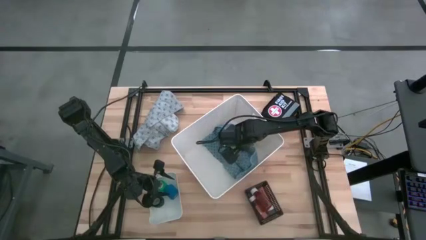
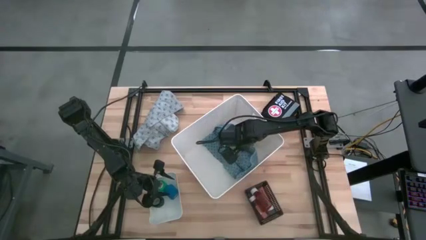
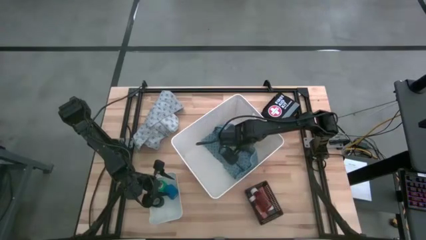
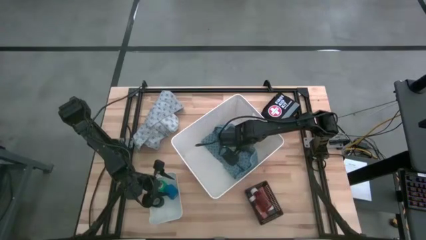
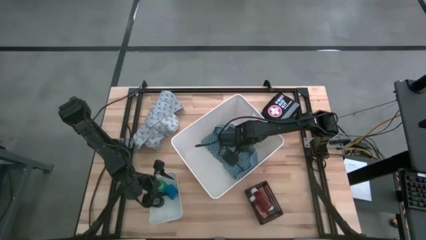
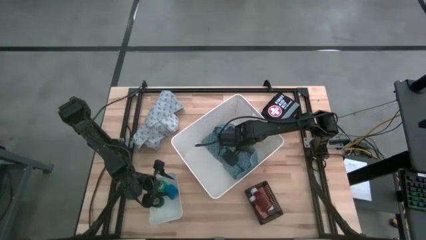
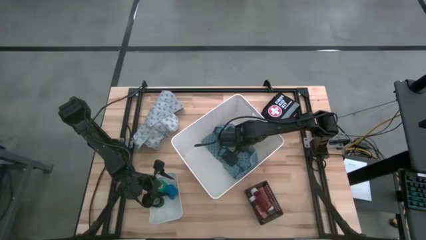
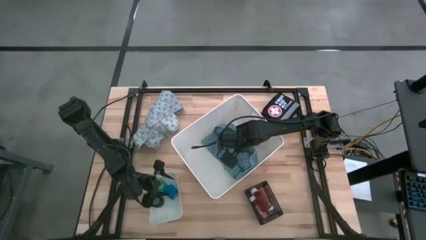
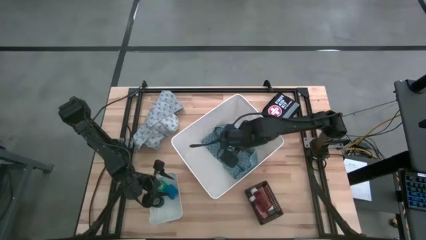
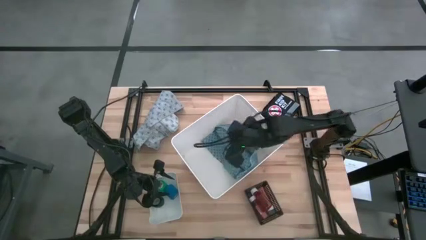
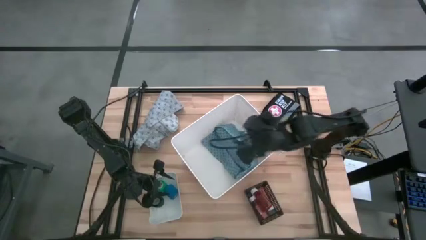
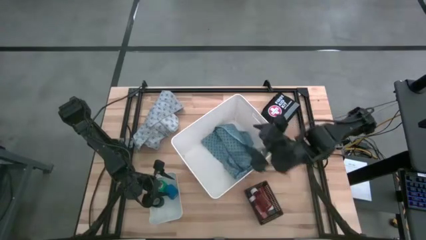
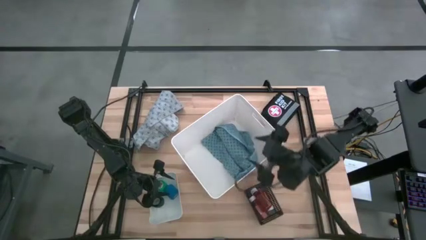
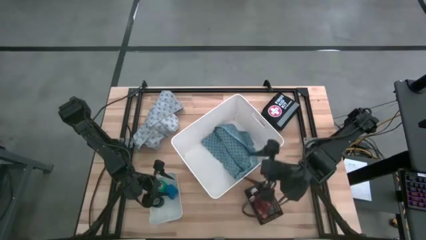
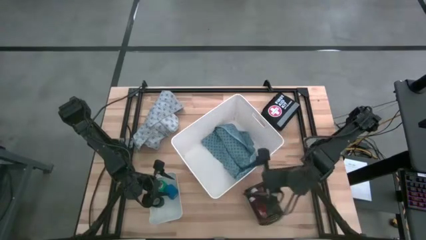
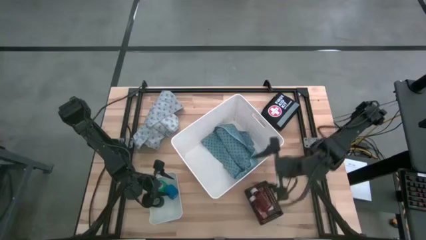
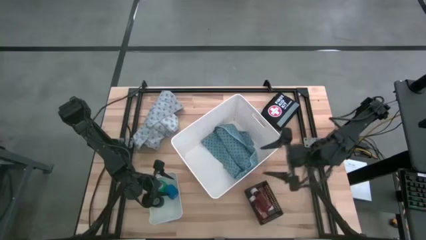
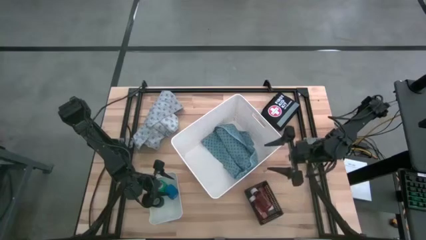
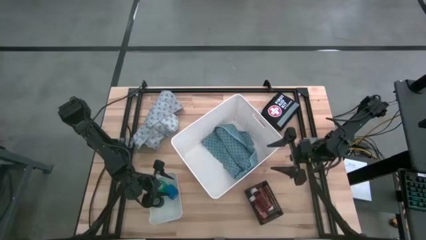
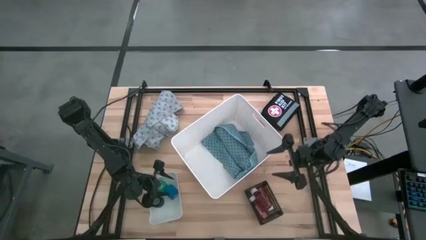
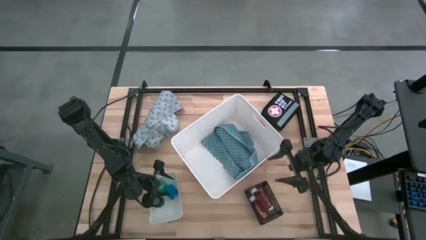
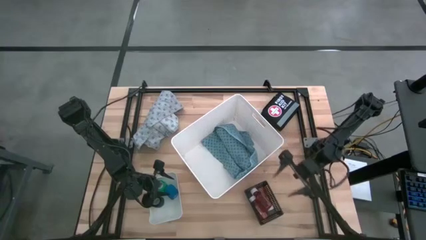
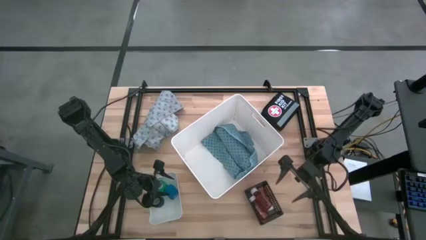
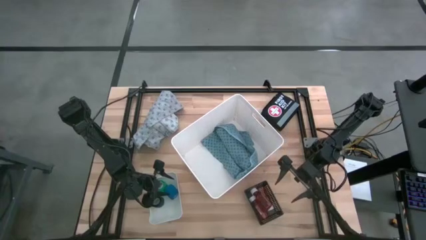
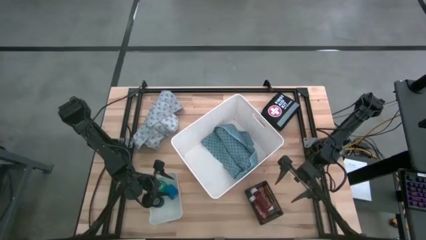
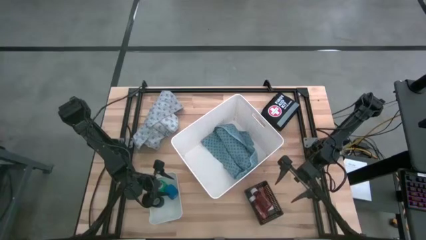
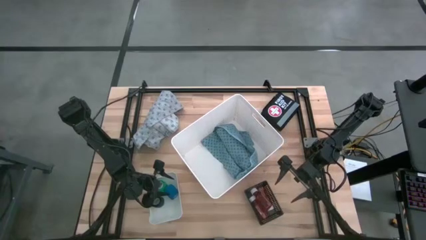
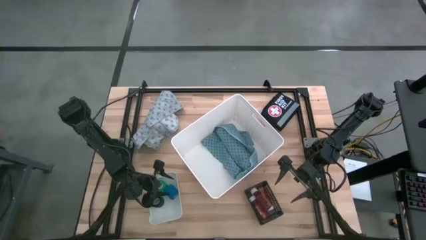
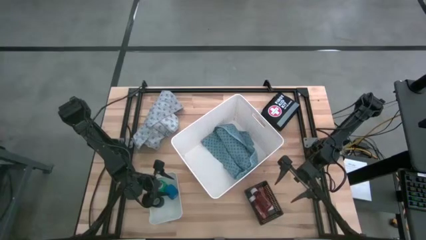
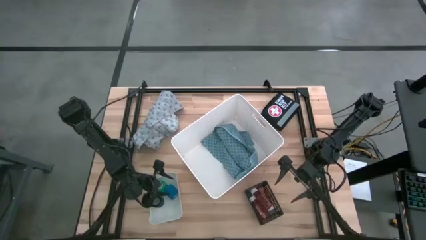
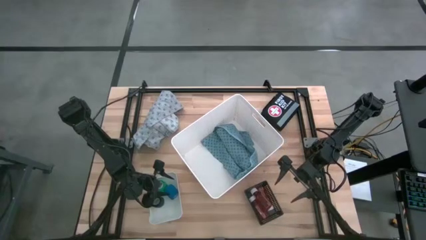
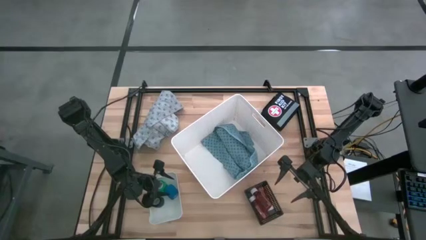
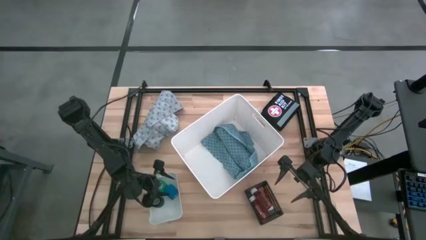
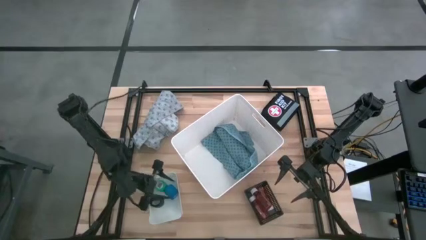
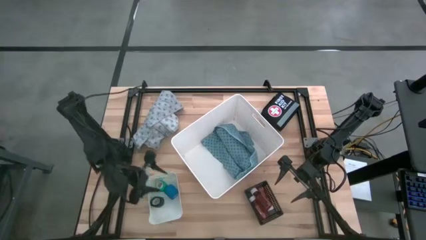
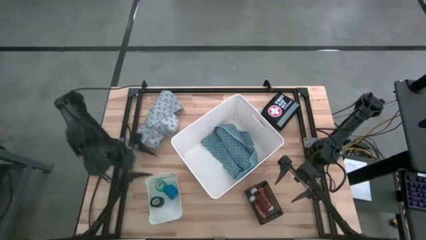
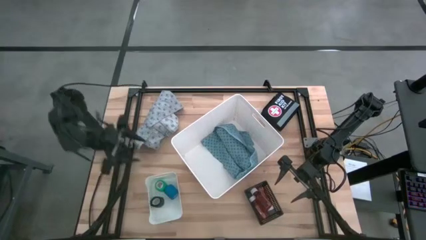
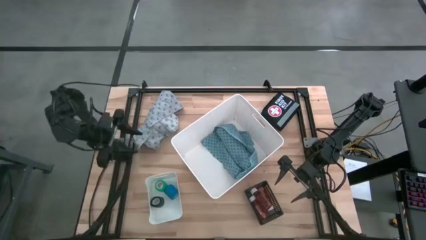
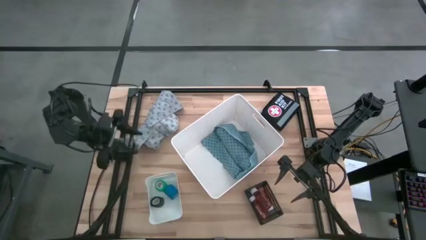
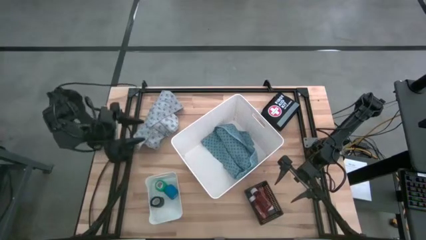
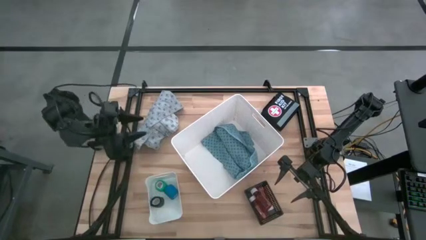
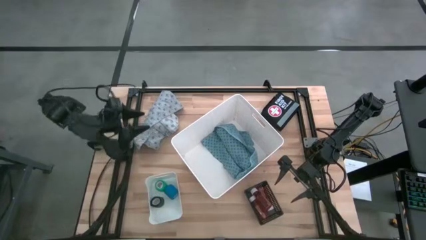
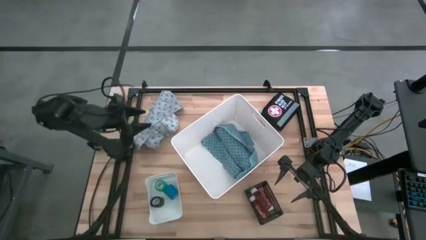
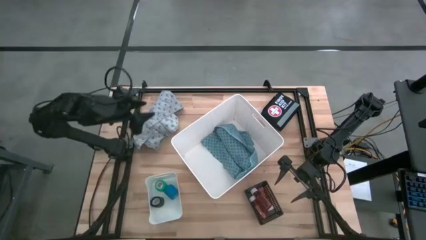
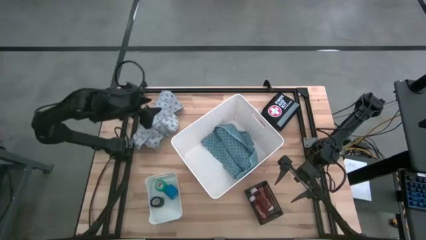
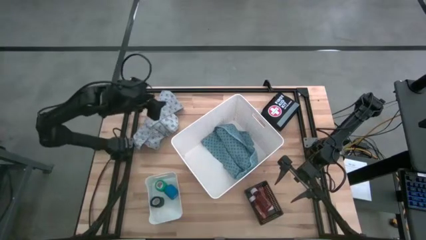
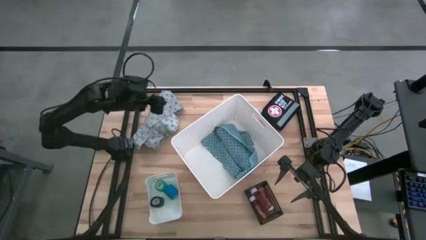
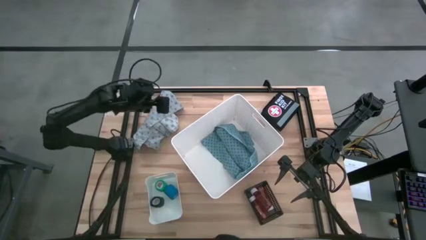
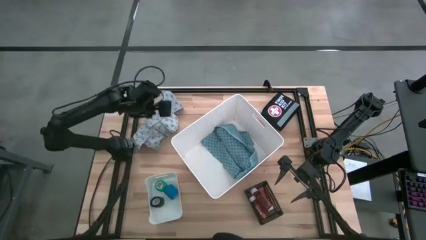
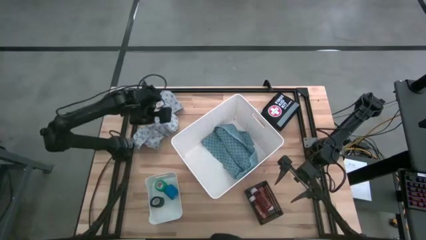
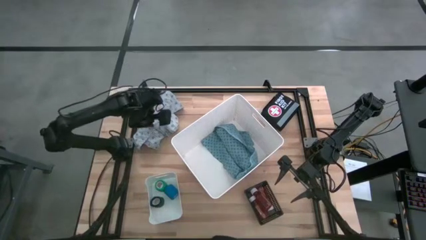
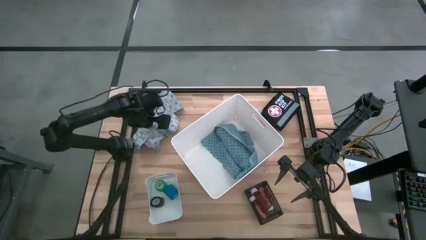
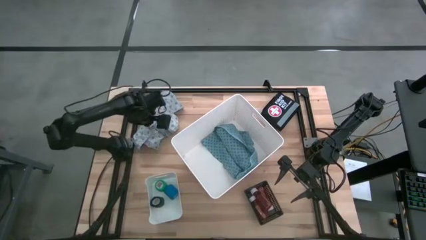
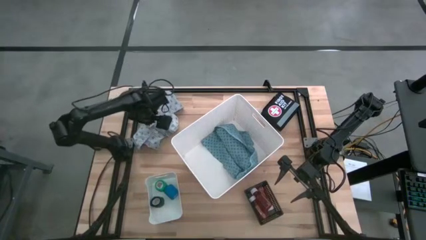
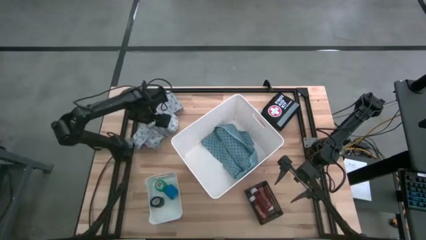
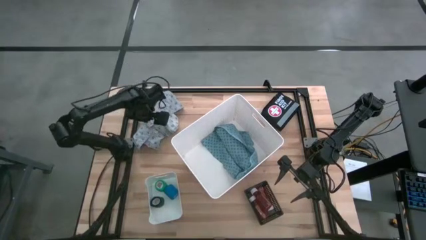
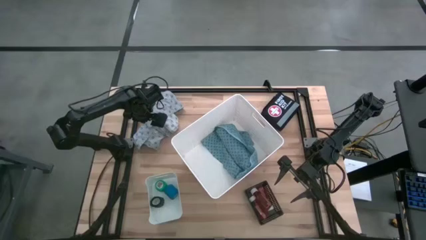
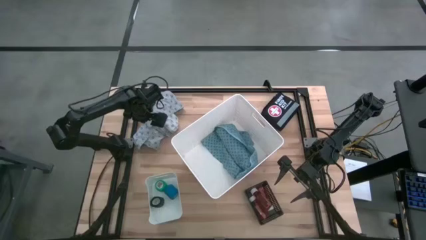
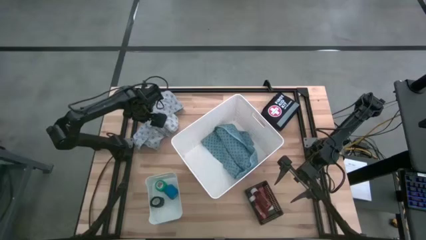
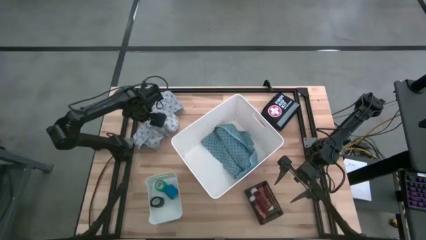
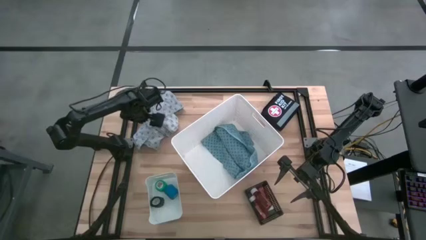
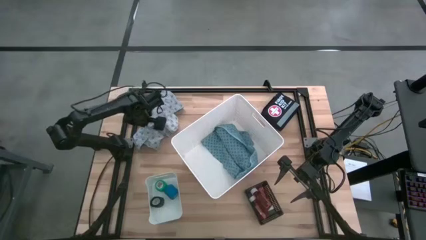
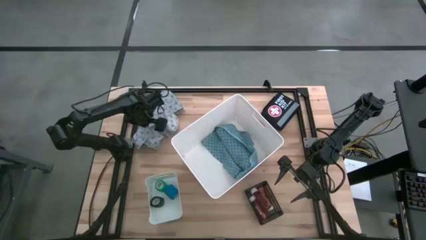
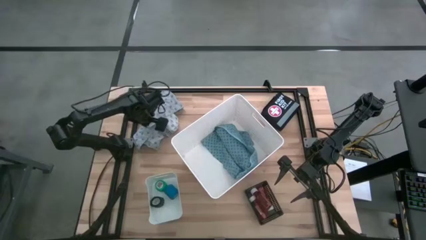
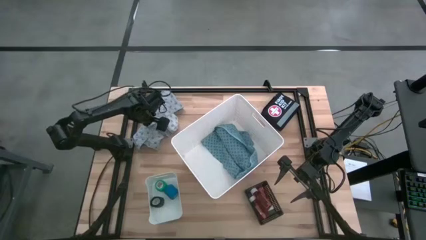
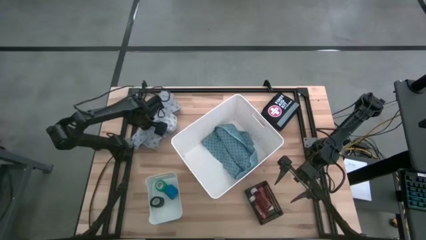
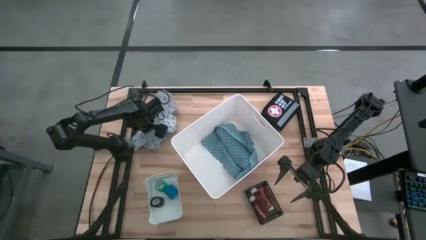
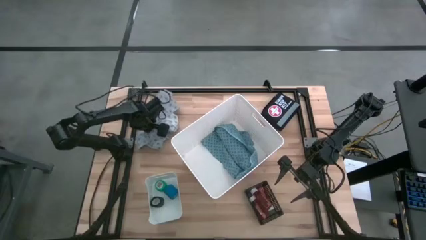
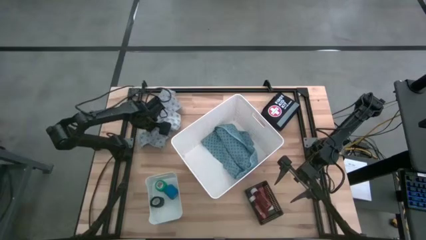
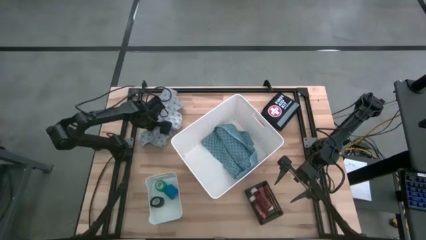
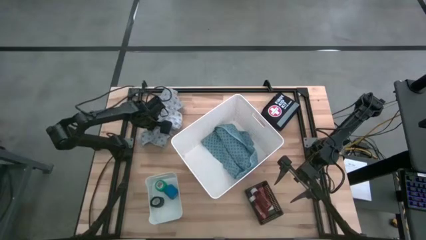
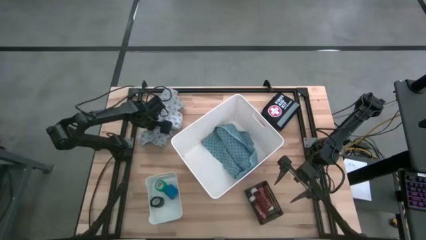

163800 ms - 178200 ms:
Task: Pick & place medical supplies in basket/bin
Put the white patient gown into the white laundry bin

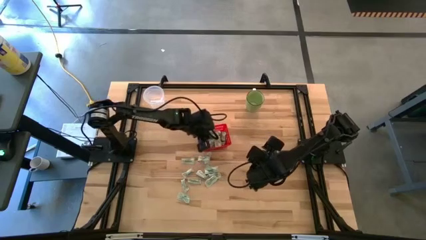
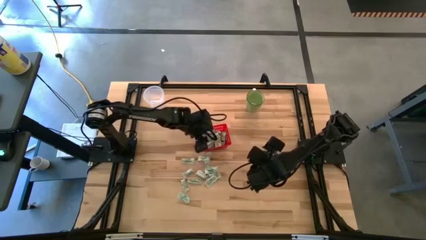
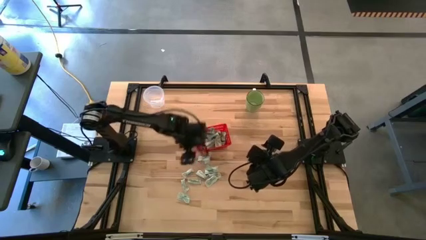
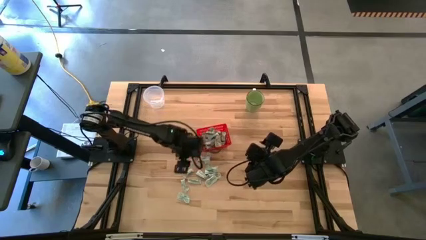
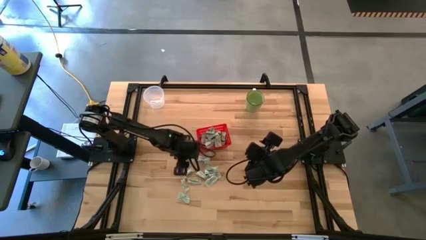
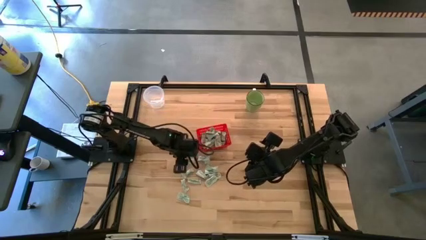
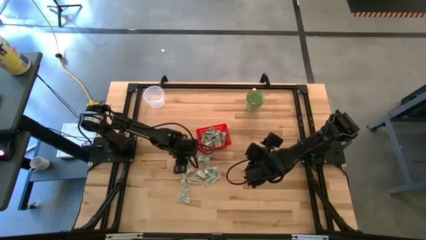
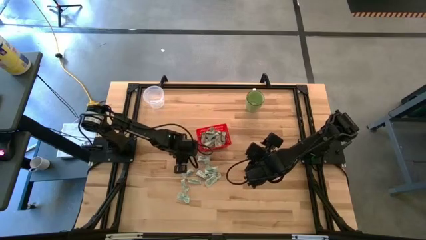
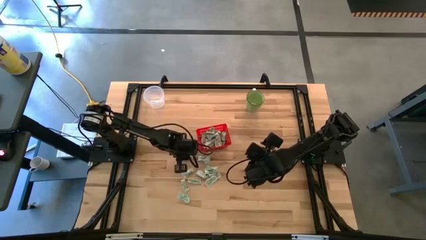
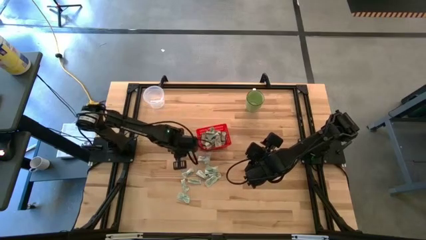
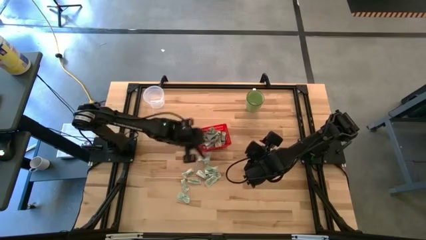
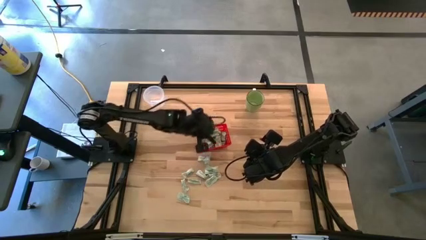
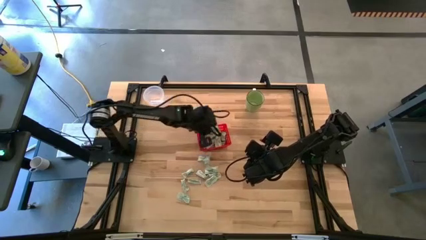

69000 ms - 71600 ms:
Task: Pick and place Stevia / Truvia into bins
Put the stevia packet into the red basket

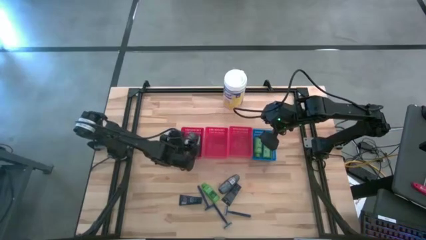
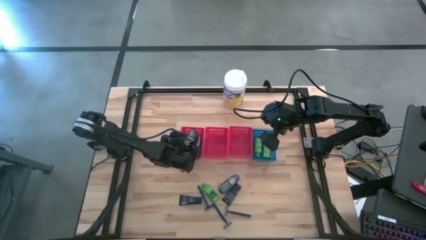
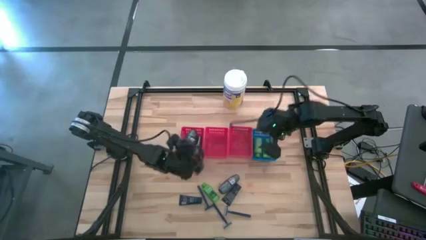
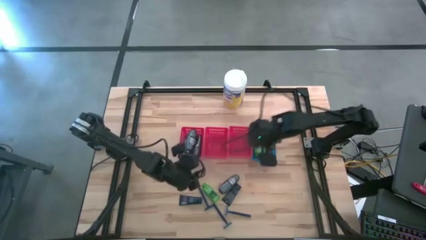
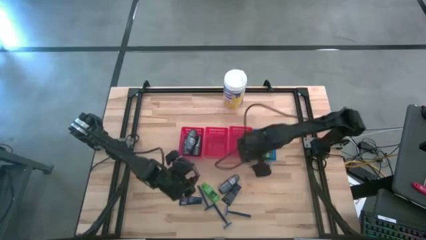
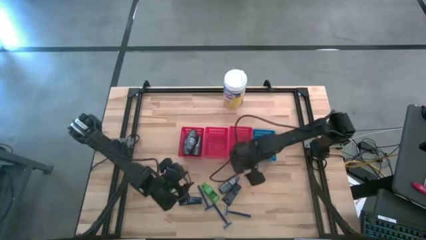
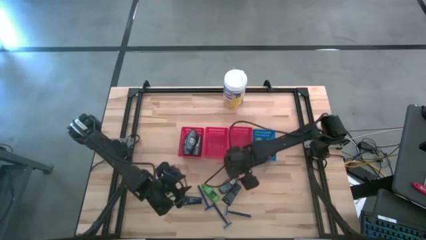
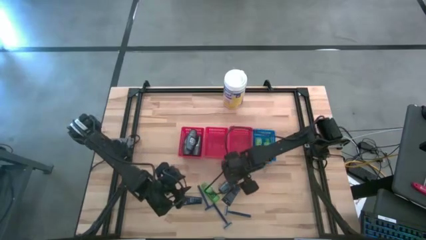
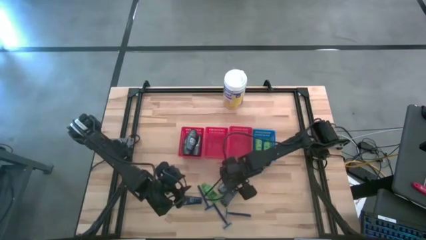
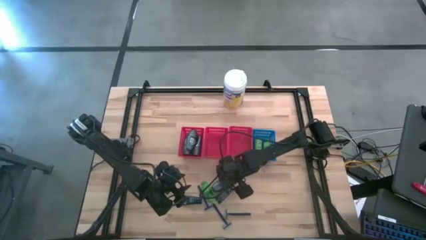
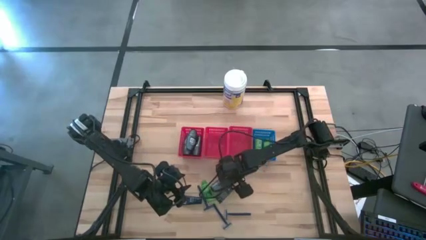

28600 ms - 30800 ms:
Task: Pick & Place Travel size toiletries
Put the black deodorant into the left red bin
